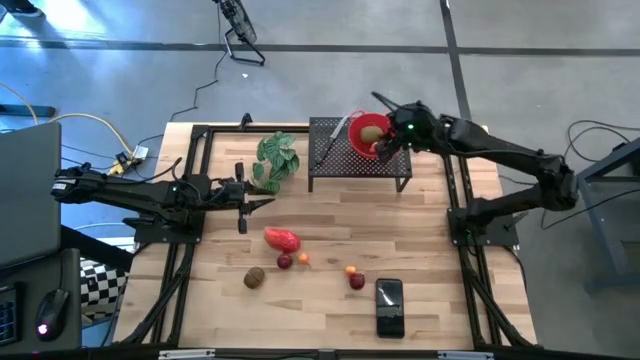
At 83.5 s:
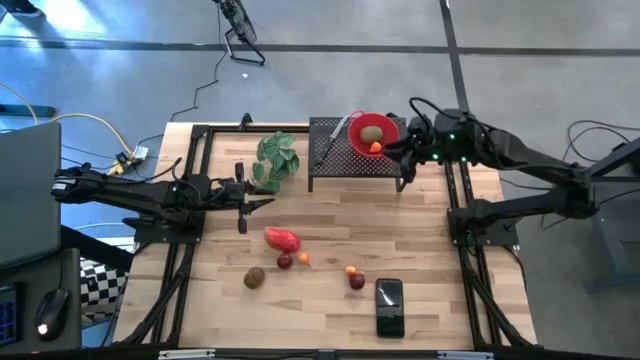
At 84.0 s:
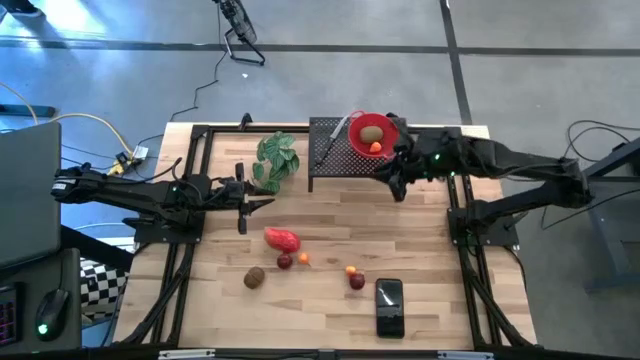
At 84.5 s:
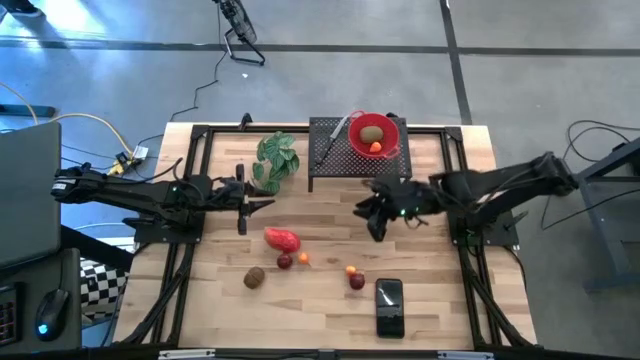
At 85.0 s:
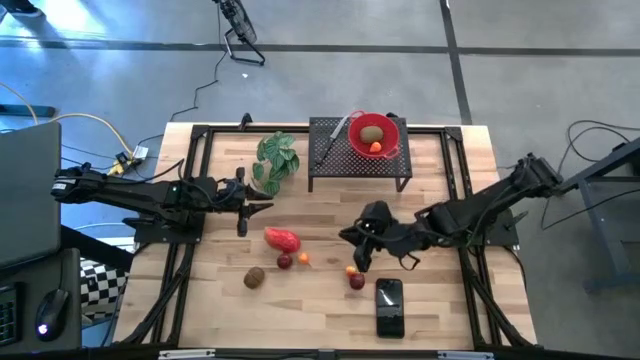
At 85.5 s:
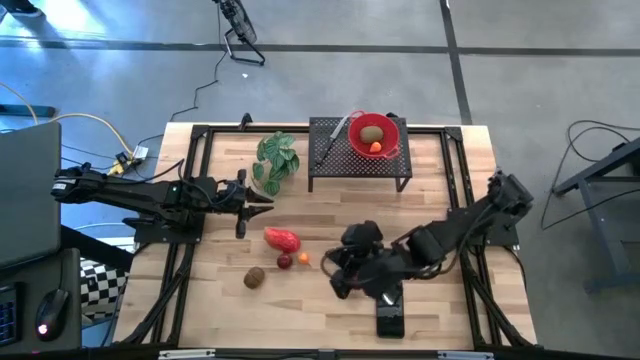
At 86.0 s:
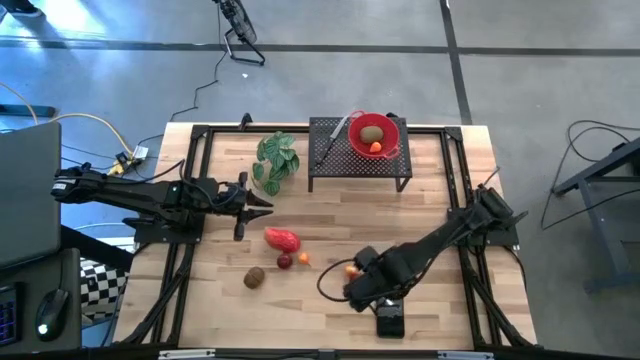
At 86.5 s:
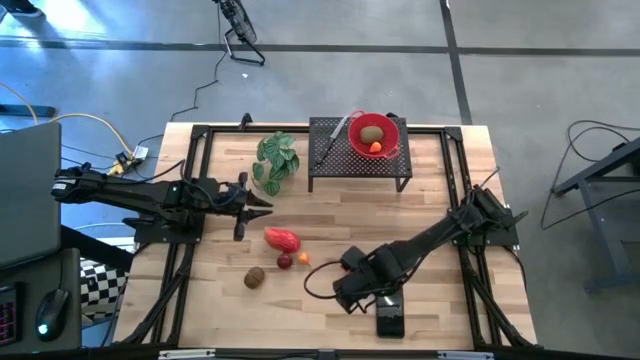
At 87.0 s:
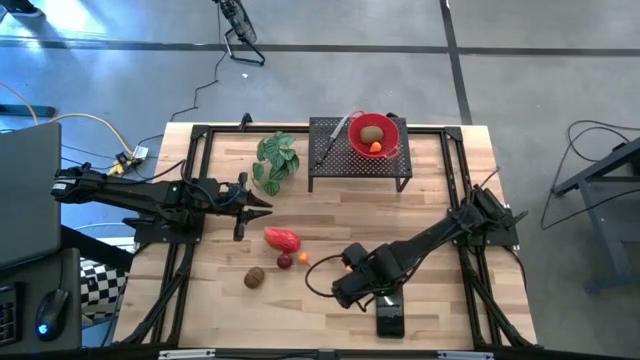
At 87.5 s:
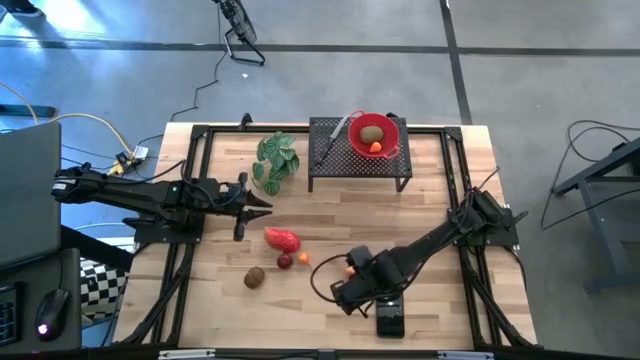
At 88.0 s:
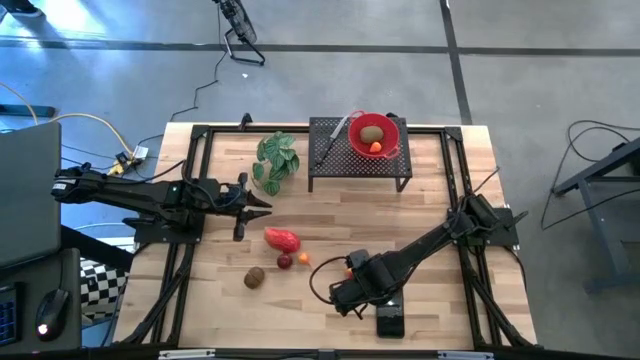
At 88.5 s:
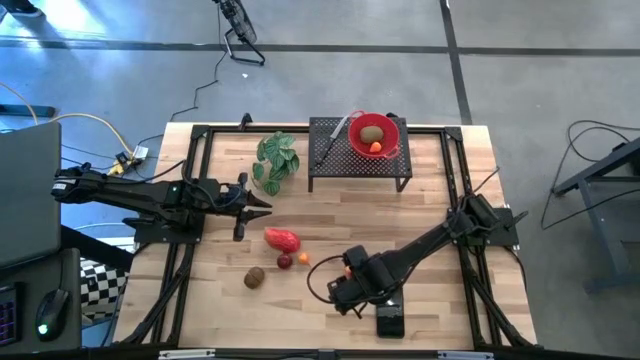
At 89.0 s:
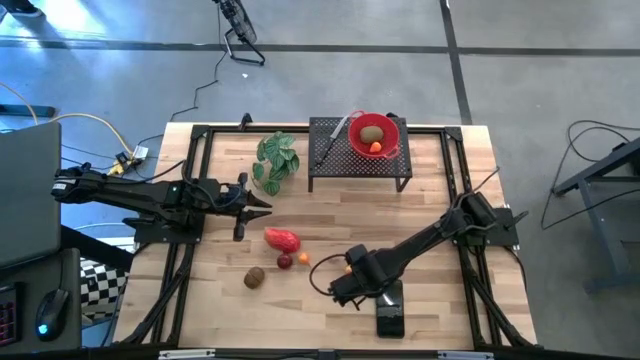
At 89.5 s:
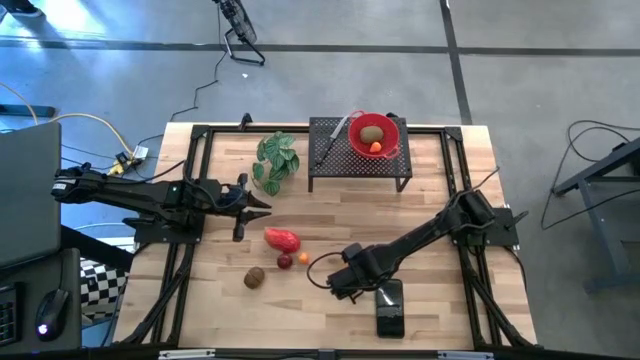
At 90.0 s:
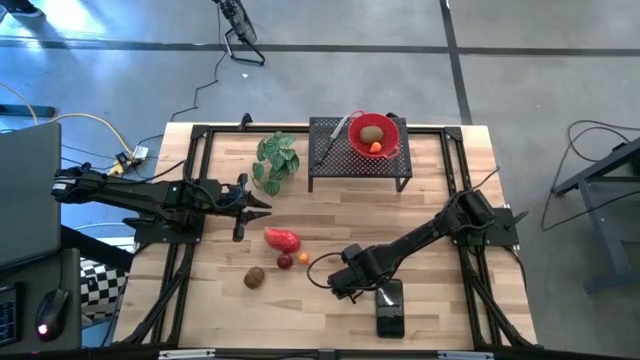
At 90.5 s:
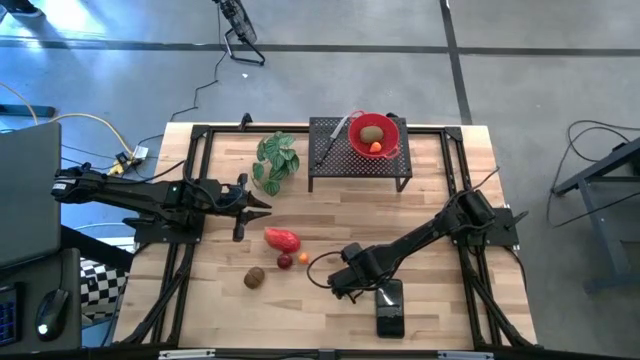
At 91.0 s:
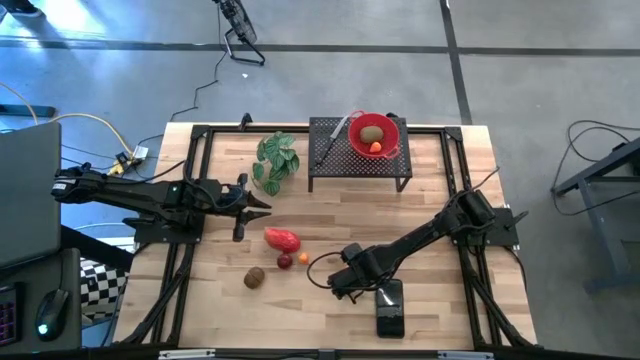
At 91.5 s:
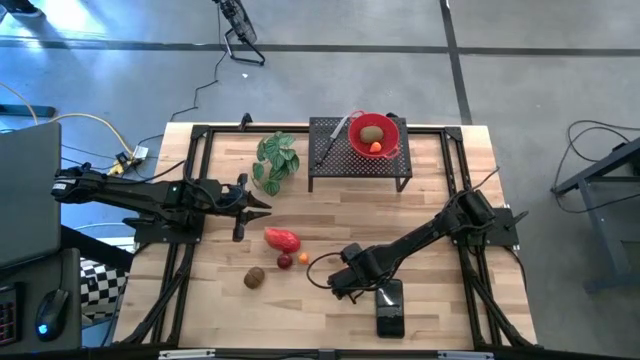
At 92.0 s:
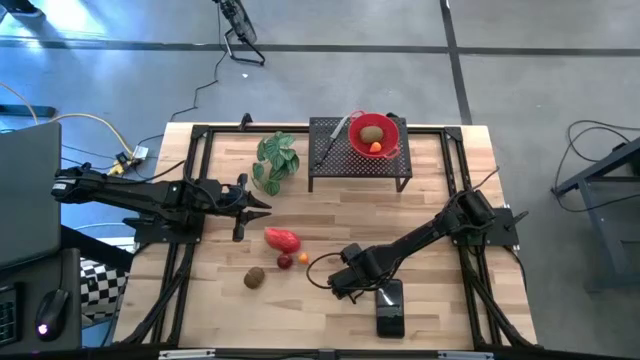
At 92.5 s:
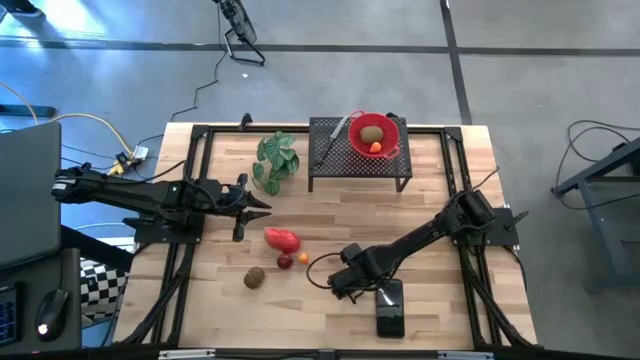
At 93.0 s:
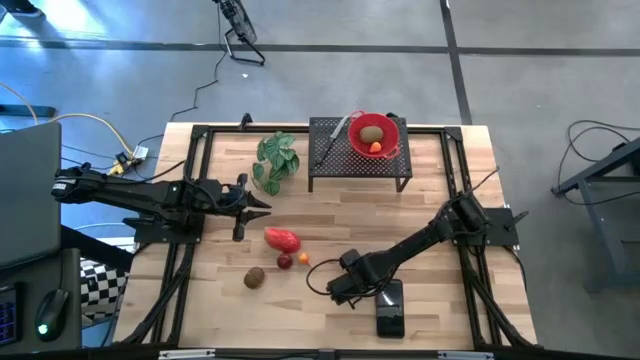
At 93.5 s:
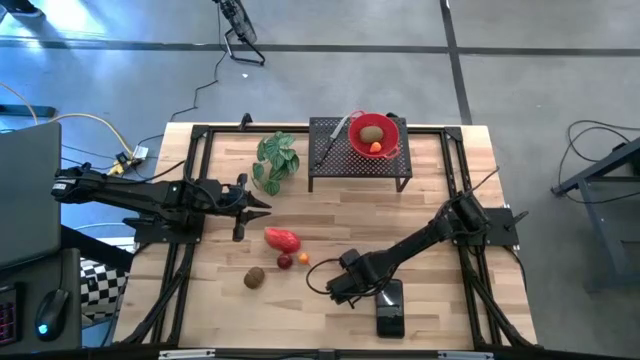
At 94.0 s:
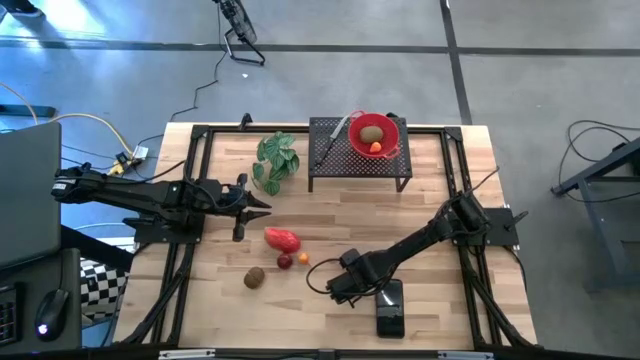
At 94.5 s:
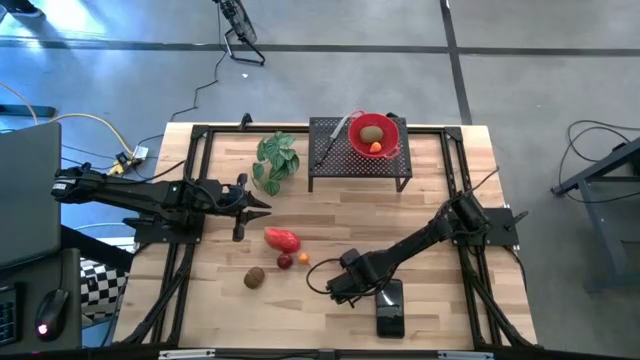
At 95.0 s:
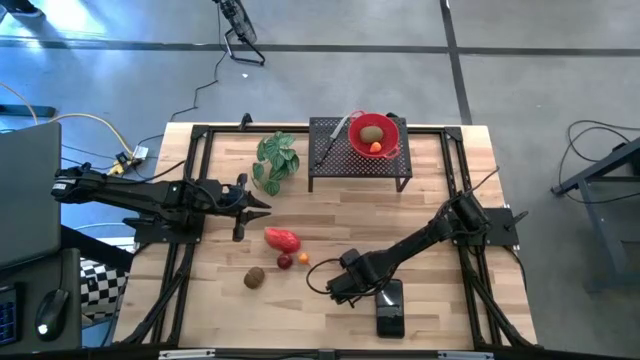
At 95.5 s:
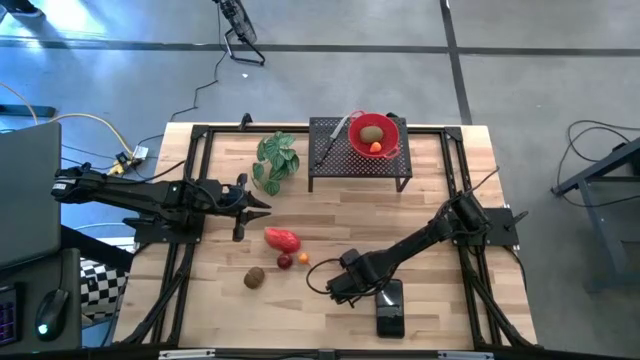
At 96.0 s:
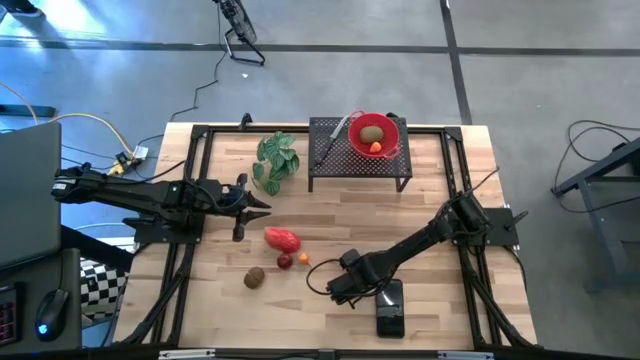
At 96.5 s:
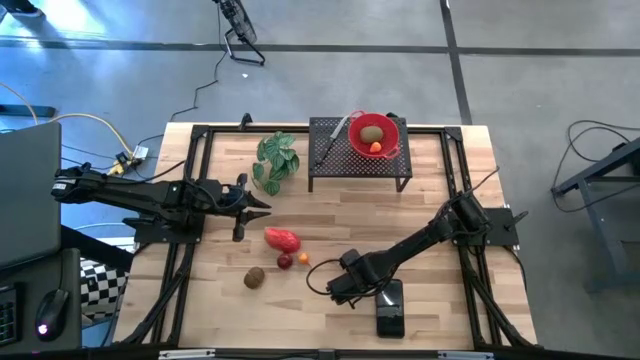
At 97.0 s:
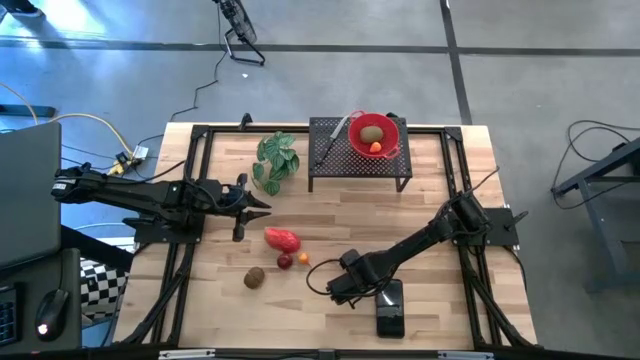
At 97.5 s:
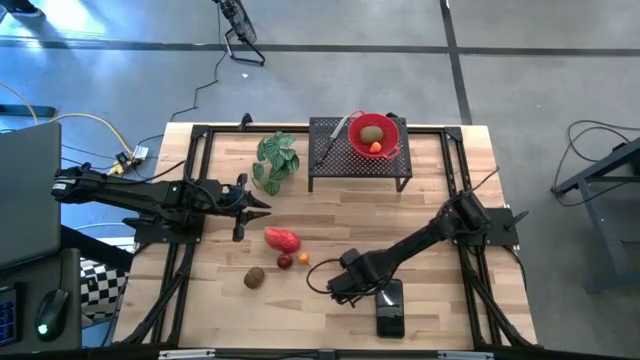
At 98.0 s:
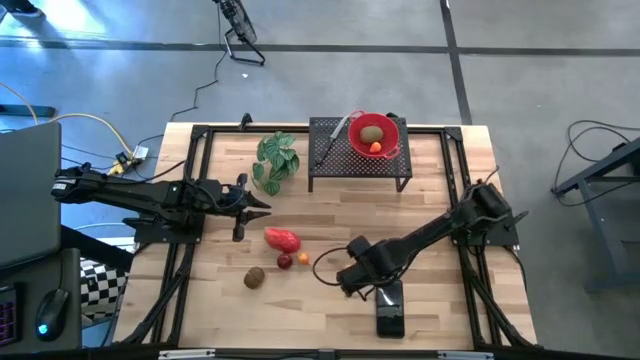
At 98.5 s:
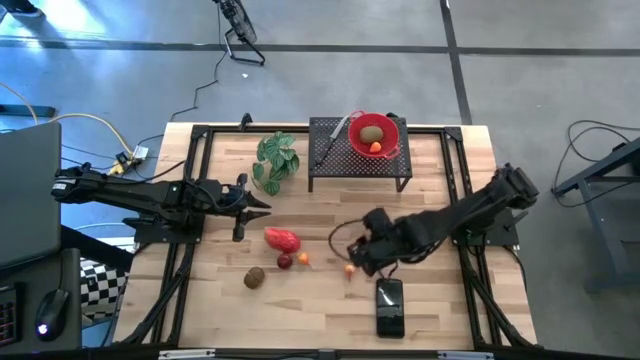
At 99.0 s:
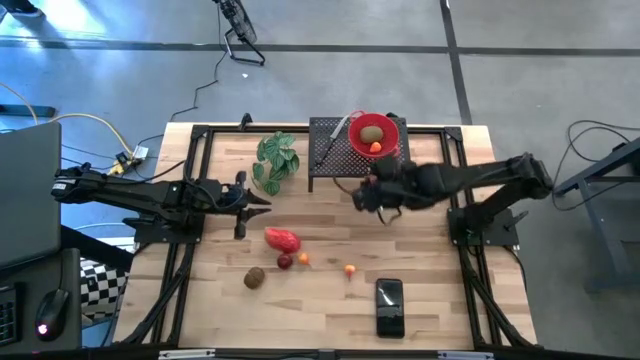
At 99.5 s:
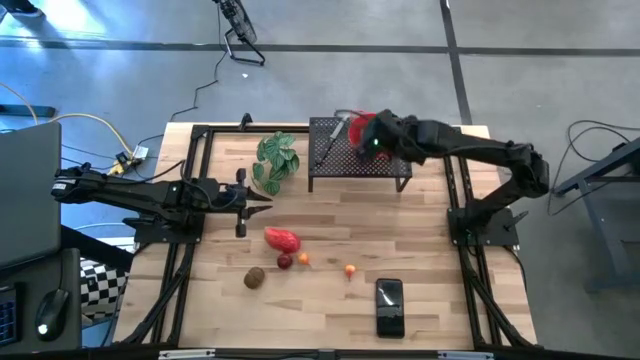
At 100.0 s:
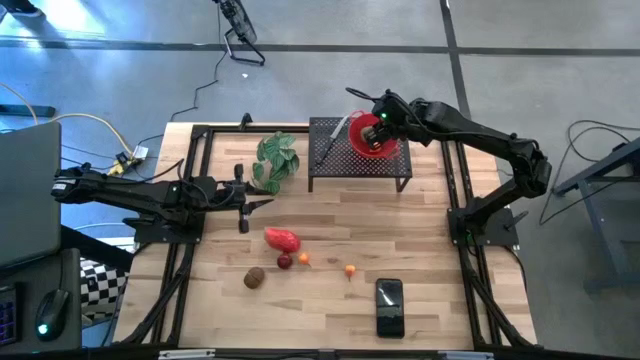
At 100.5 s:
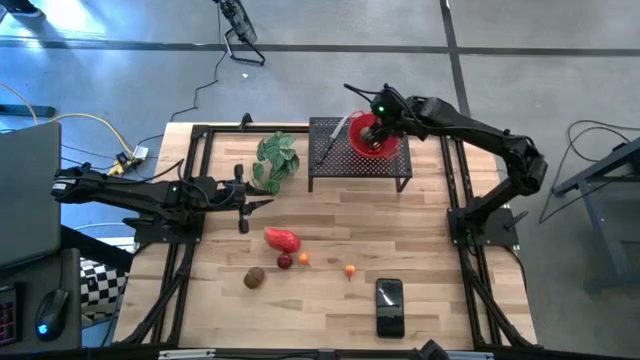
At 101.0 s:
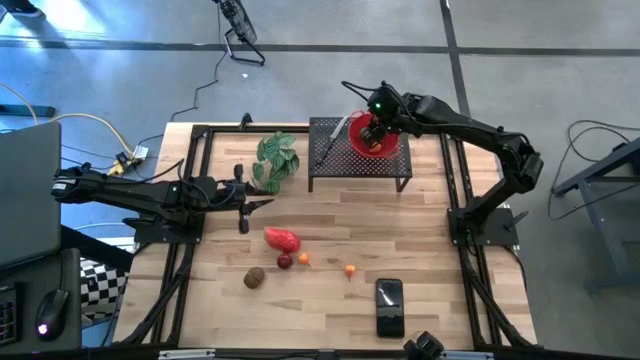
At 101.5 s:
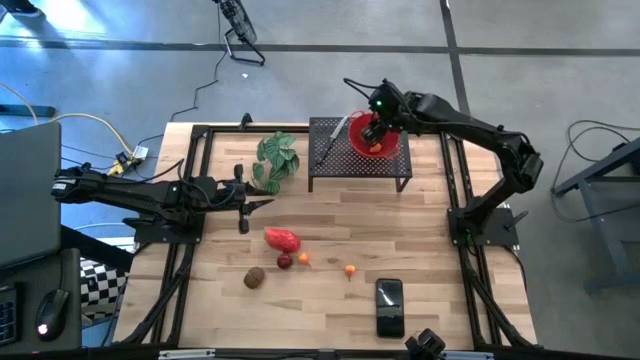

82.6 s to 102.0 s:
Task: Pick & Place Fruit
Put the right red pomegranate into the red strainer bowl on the shelf
